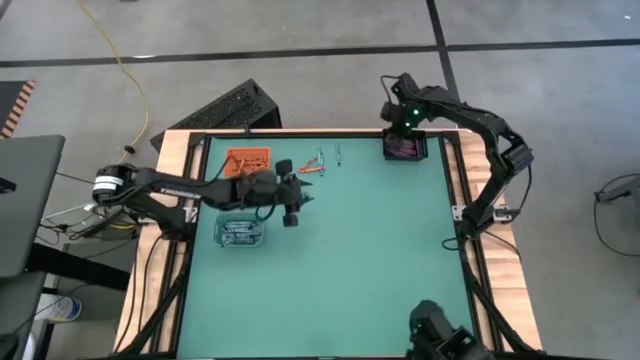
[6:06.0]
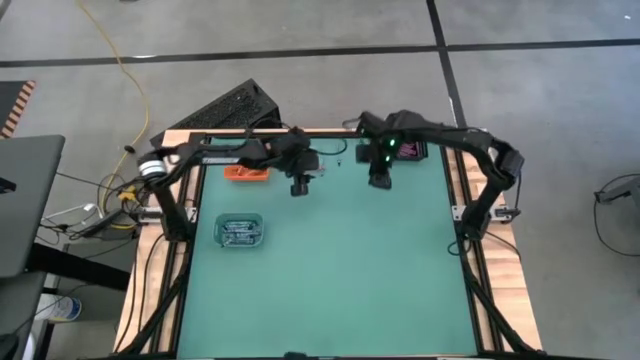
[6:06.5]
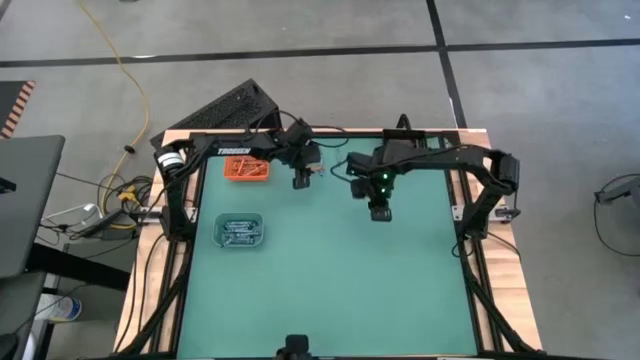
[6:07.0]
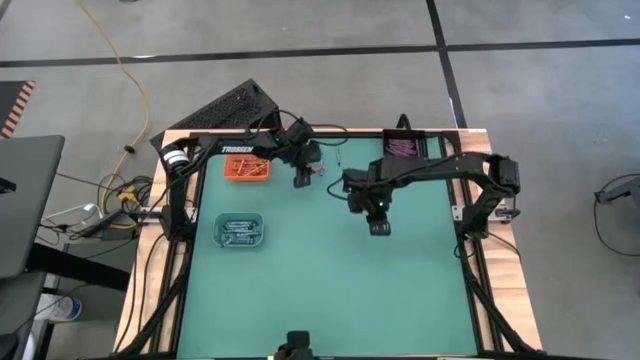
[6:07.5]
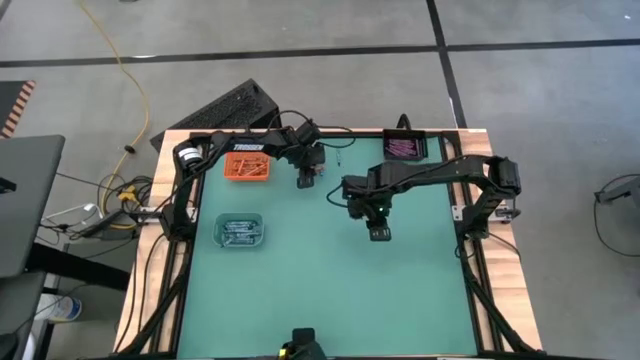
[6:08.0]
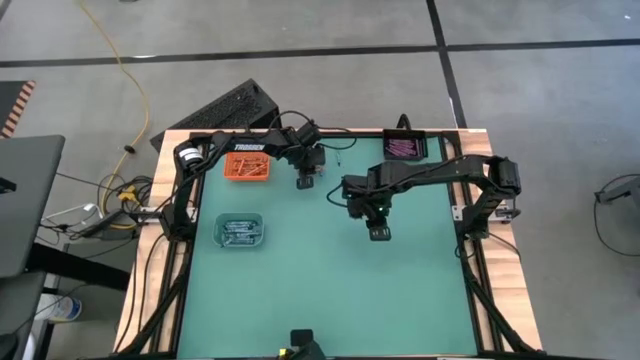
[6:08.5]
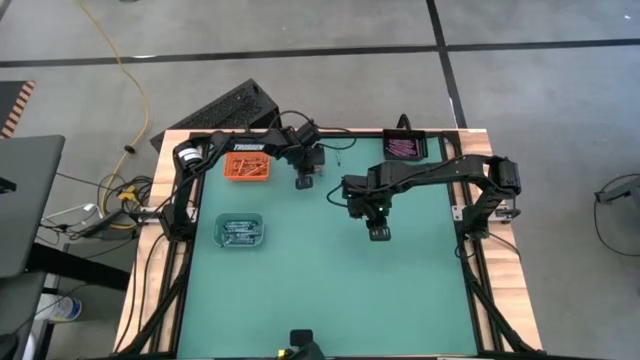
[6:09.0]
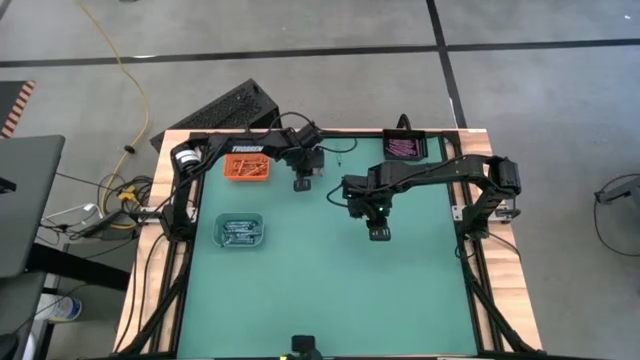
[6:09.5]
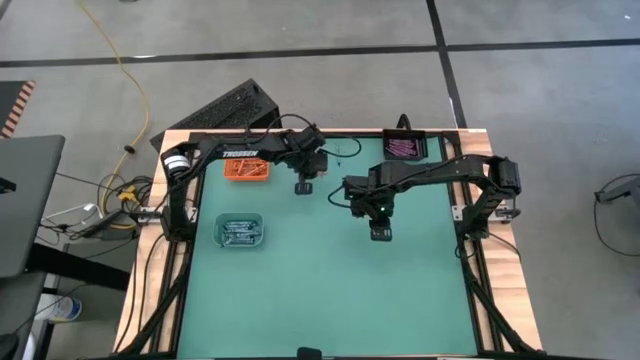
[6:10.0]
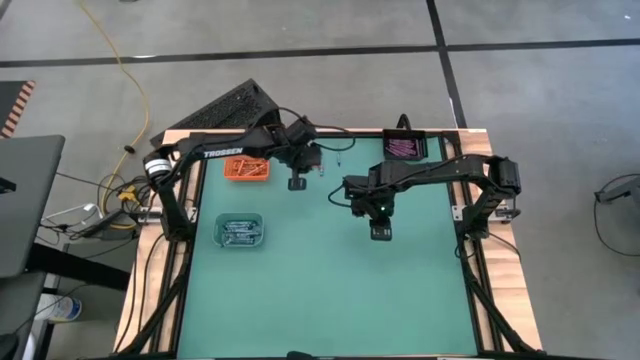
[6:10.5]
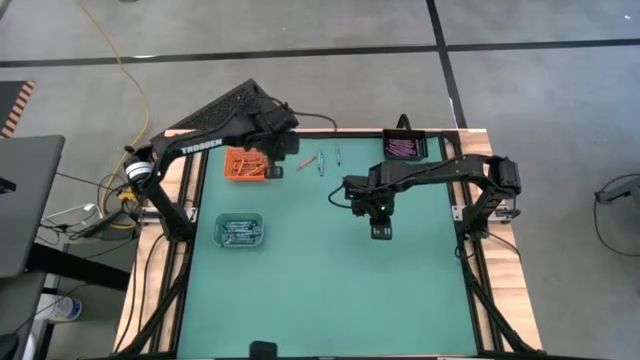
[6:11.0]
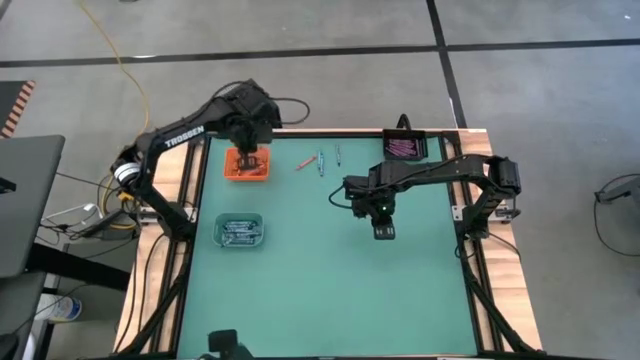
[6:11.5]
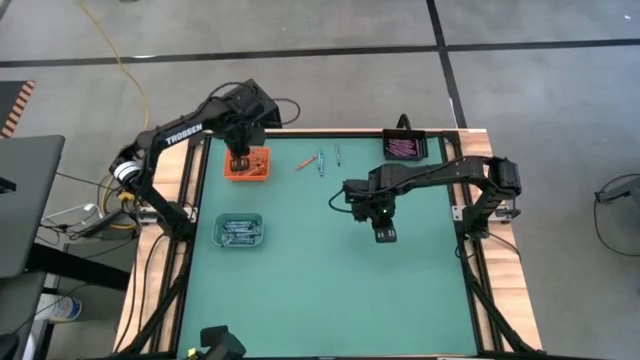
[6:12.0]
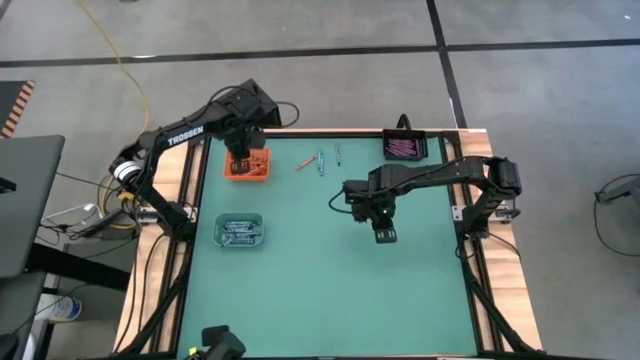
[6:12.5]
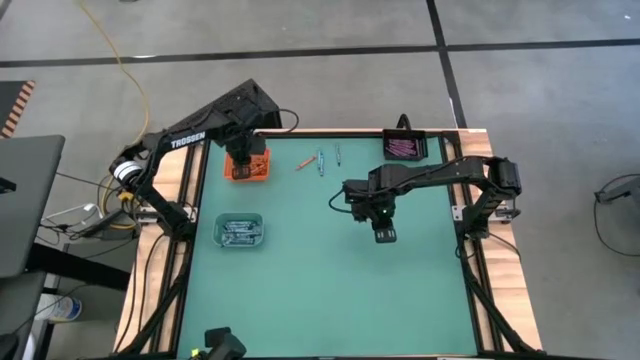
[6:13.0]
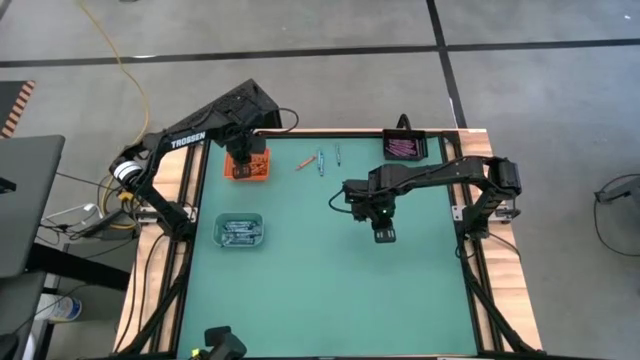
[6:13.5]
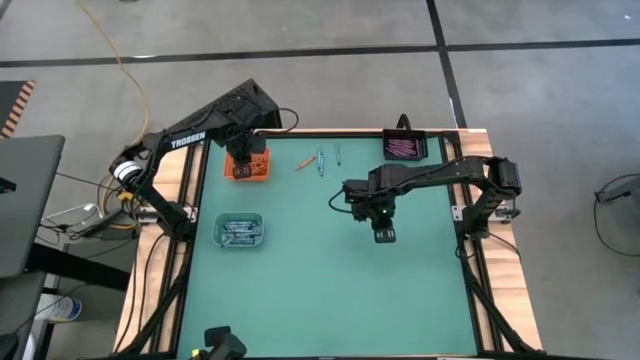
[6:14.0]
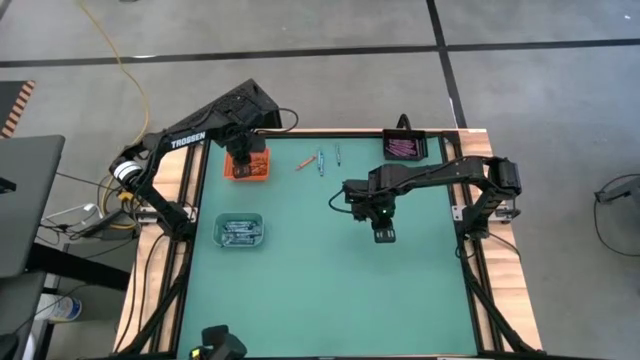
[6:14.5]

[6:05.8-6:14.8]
Task: Sort crayons
Put the orange crayon into the orange basket

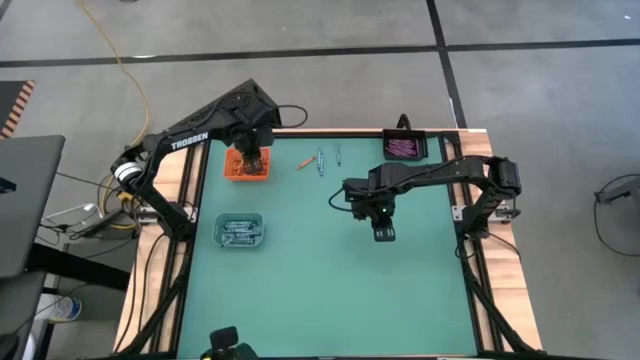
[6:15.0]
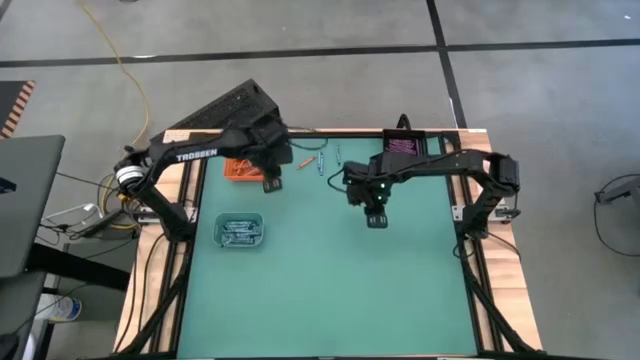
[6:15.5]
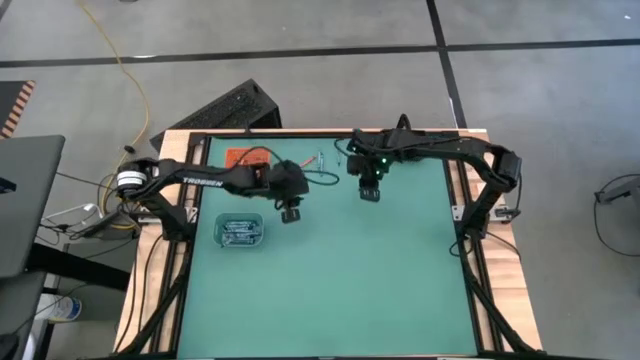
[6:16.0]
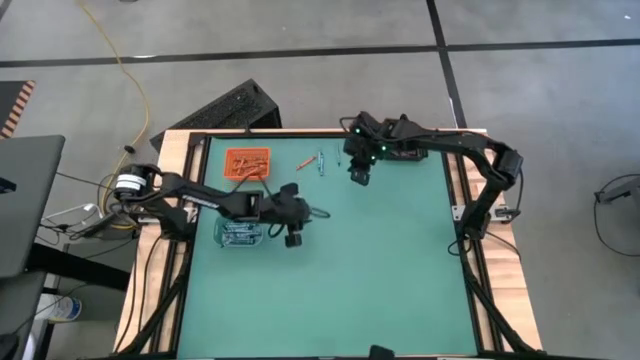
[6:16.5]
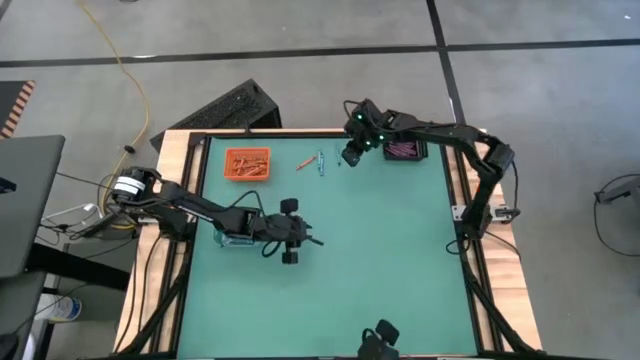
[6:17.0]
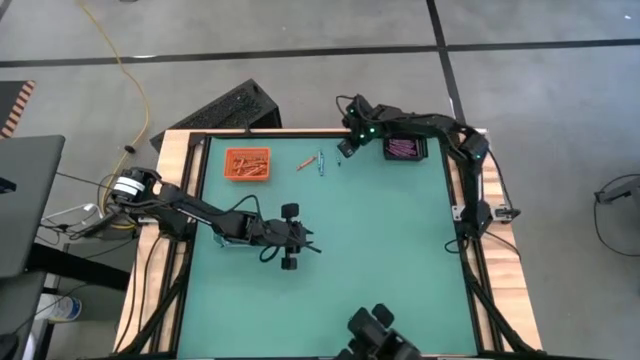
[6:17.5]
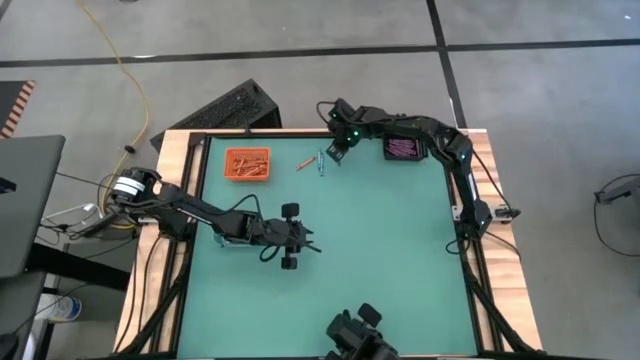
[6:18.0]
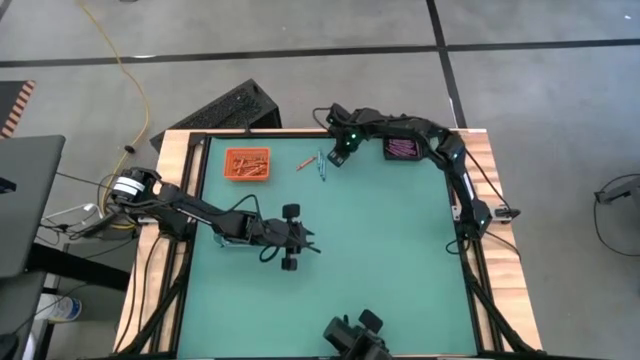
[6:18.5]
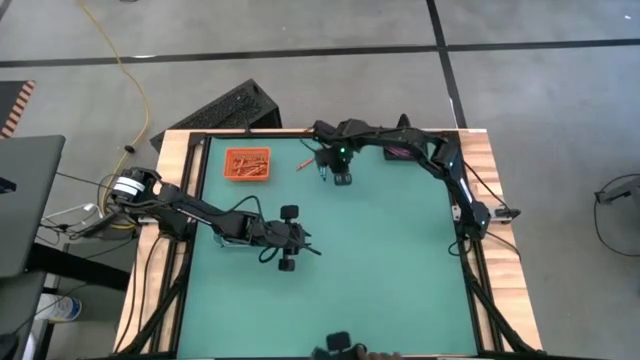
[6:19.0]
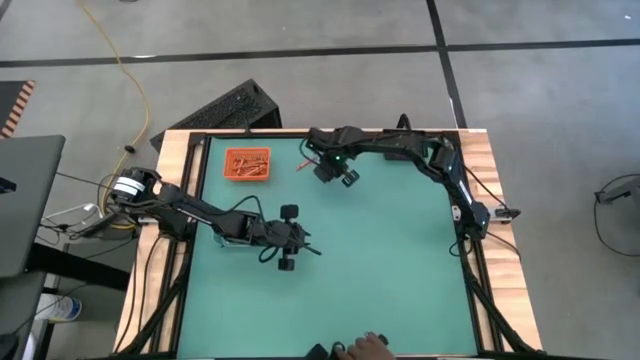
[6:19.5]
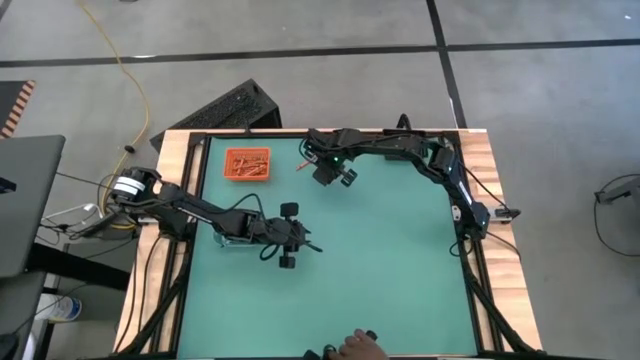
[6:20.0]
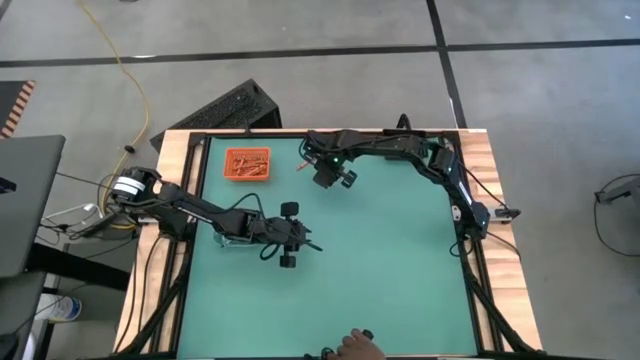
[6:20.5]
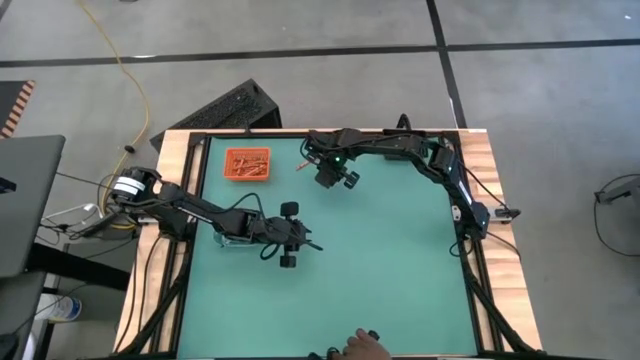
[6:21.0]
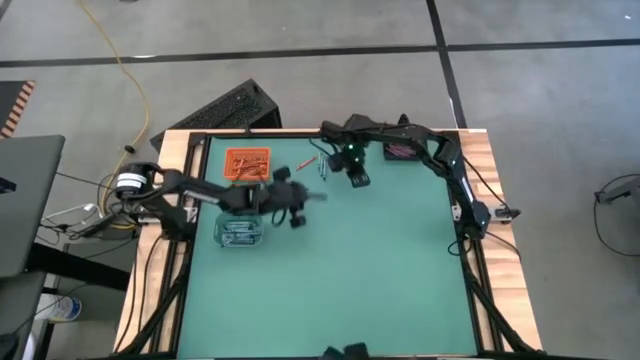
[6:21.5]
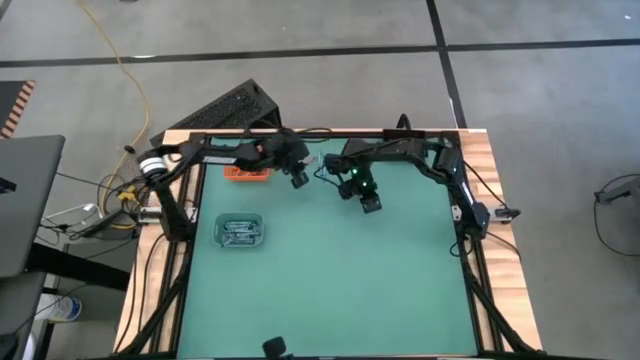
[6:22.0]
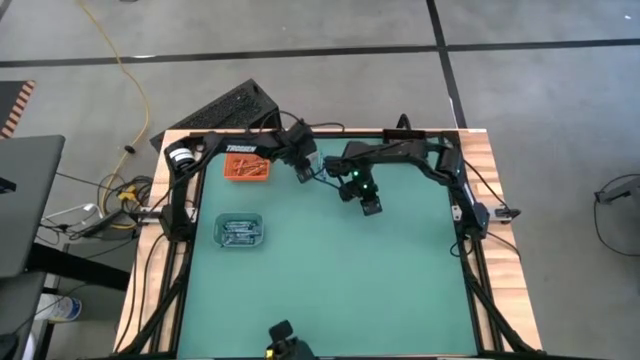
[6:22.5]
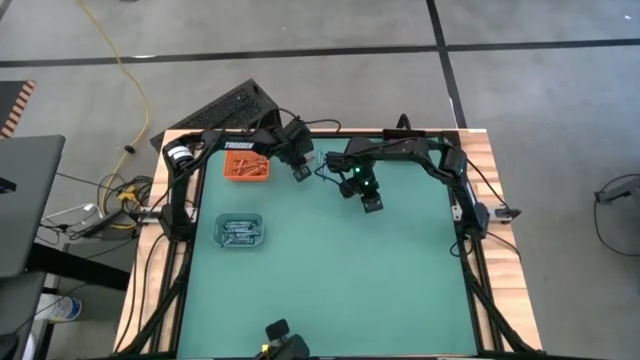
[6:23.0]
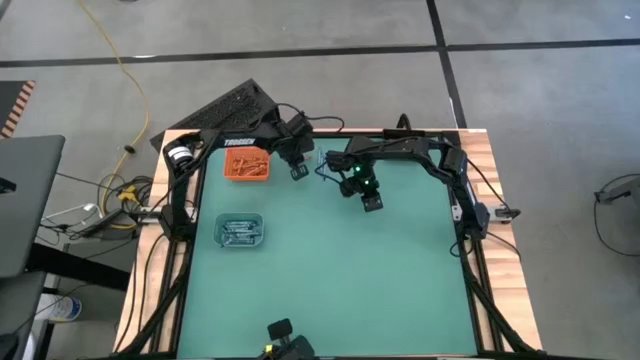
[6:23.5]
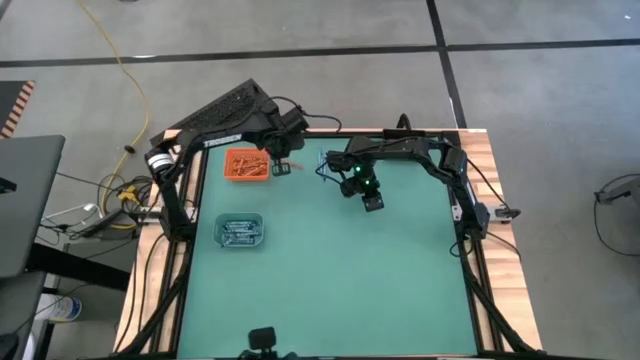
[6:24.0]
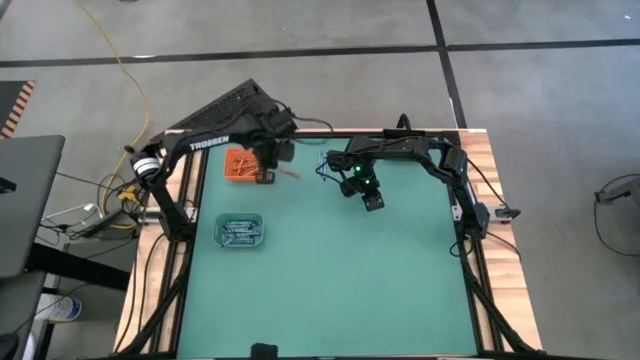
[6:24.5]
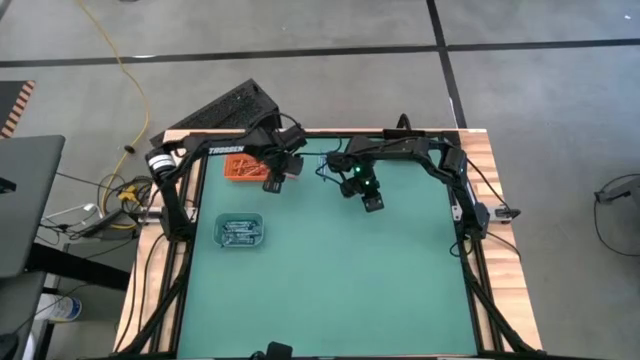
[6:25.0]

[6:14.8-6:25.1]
Put the orange crayon into the orange basket

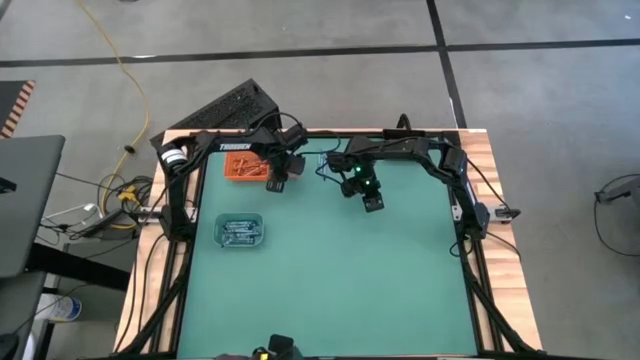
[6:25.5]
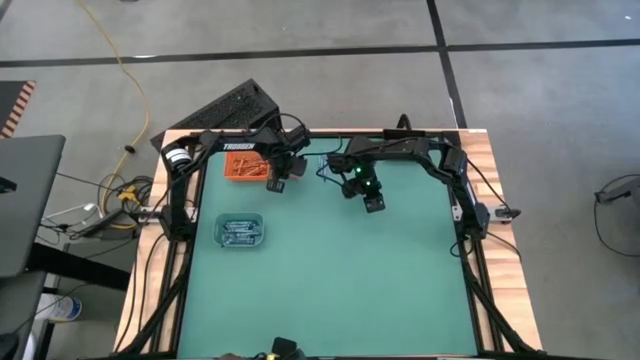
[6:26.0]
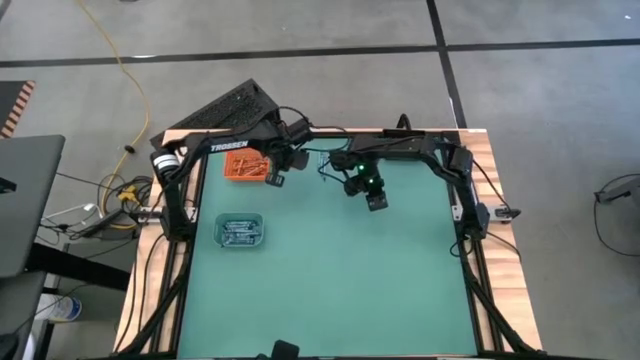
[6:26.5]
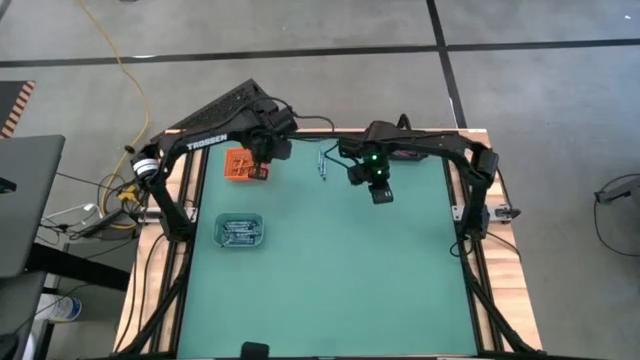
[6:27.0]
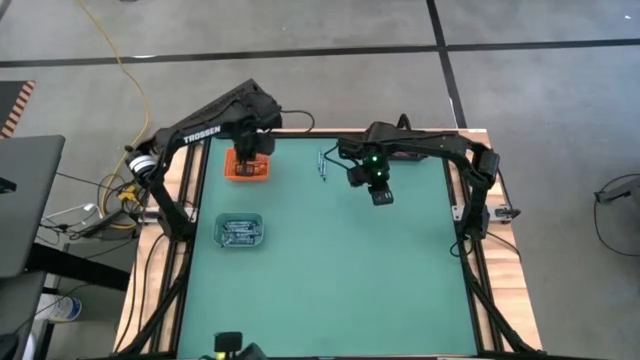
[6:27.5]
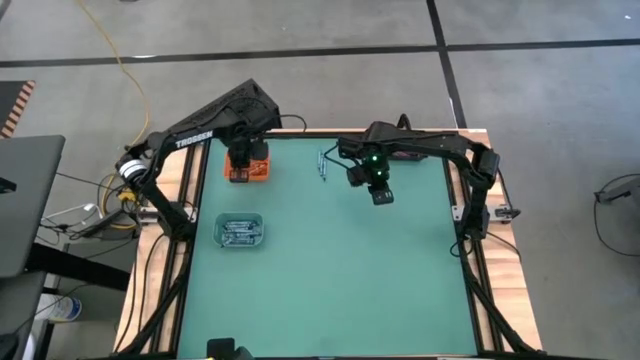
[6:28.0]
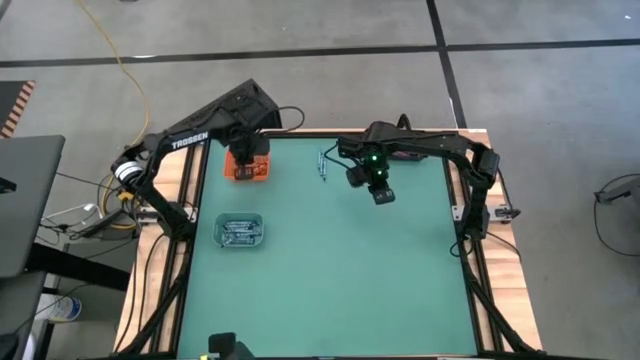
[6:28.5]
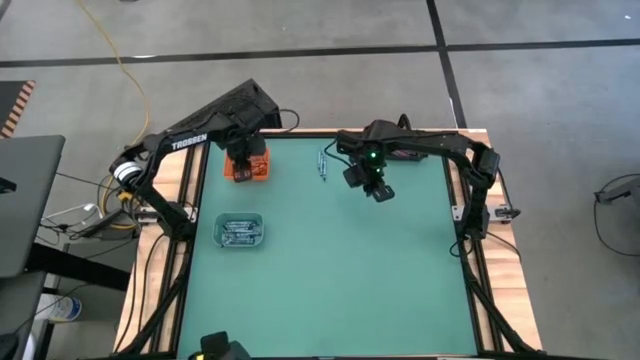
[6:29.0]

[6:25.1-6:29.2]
Put the orange crayon into the orange basket
